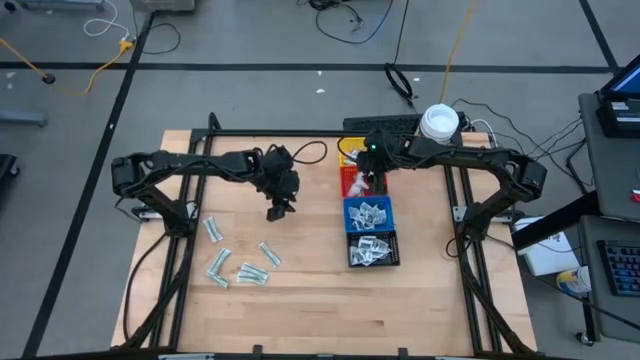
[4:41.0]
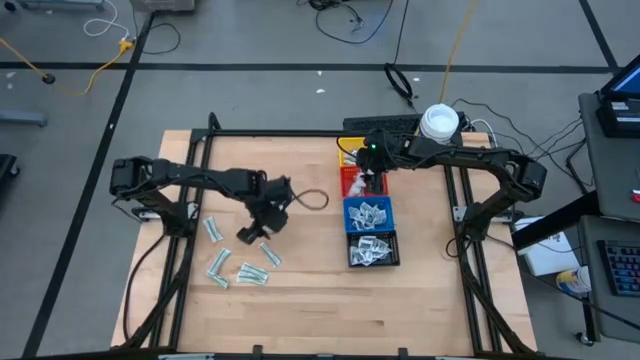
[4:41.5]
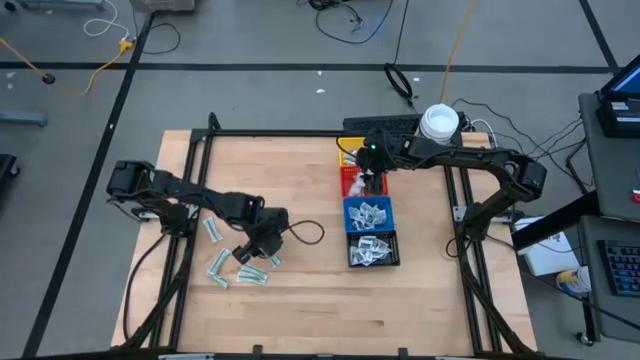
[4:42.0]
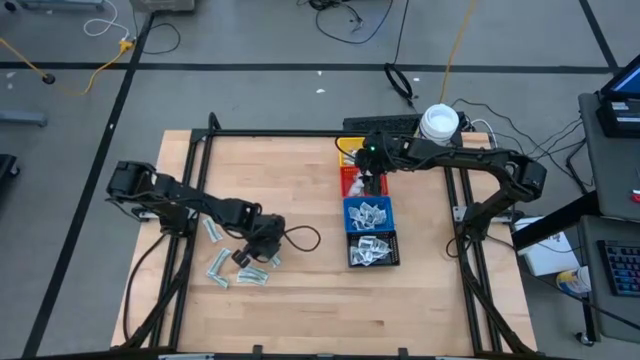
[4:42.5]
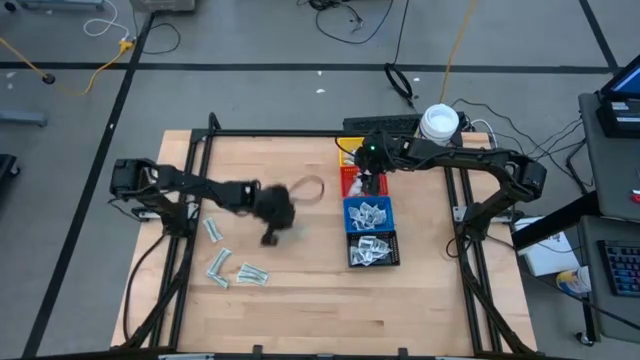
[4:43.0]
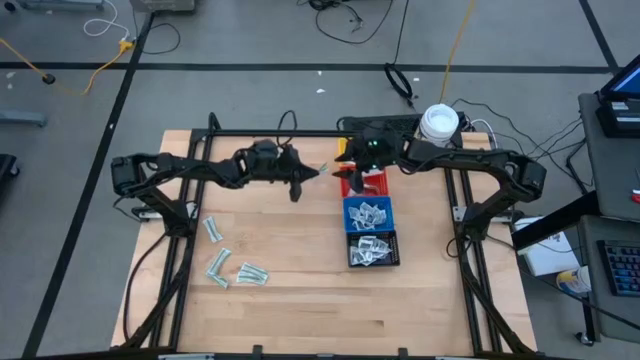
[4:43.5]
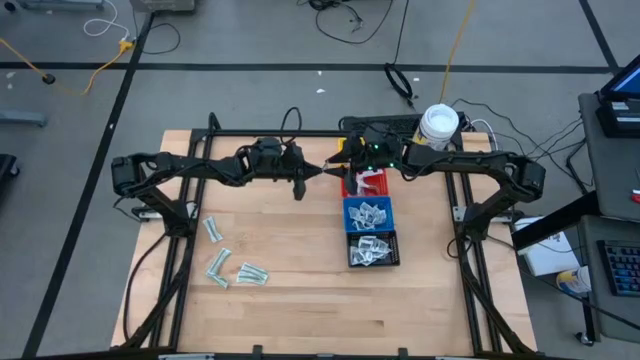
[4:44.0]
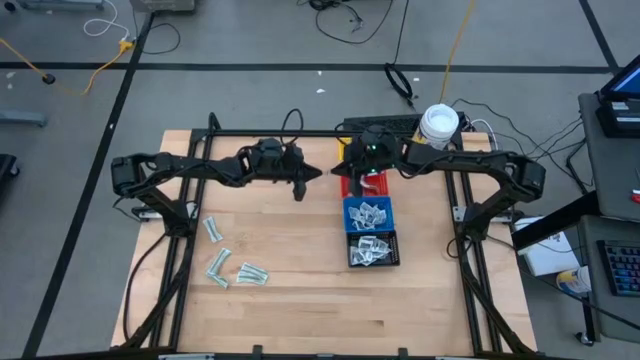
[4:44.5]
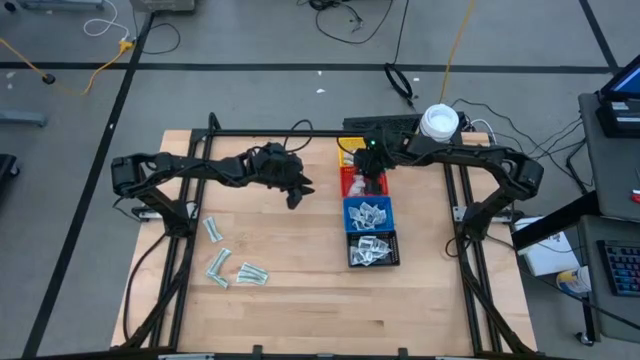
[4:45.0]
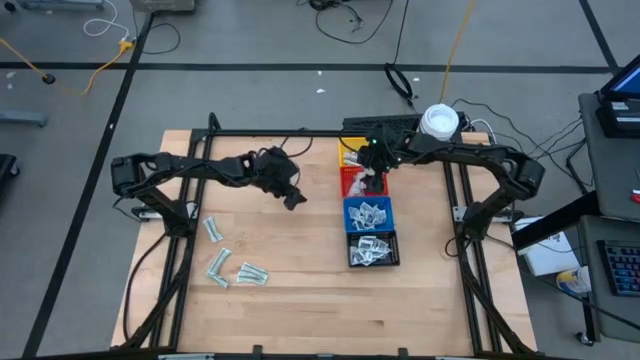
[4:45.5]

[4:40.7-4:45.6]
Task: Pick & Place First Aid Supplies
Put the green bandage pack into the red bin

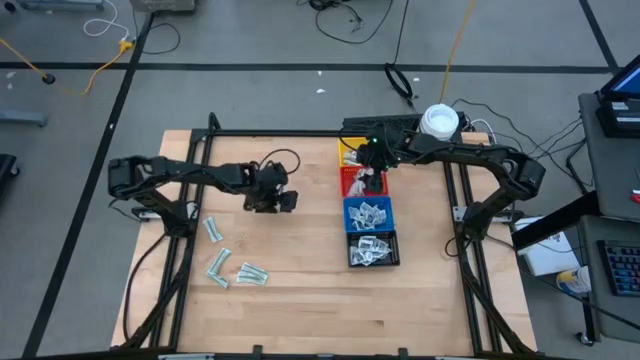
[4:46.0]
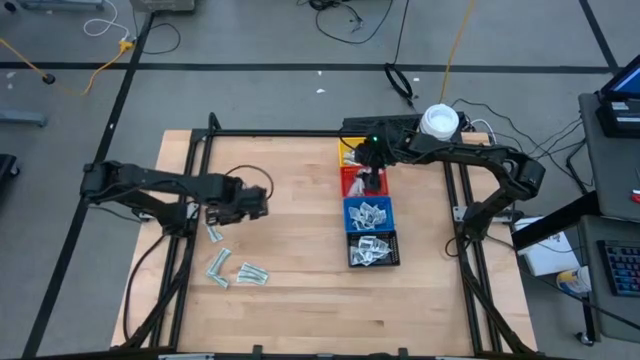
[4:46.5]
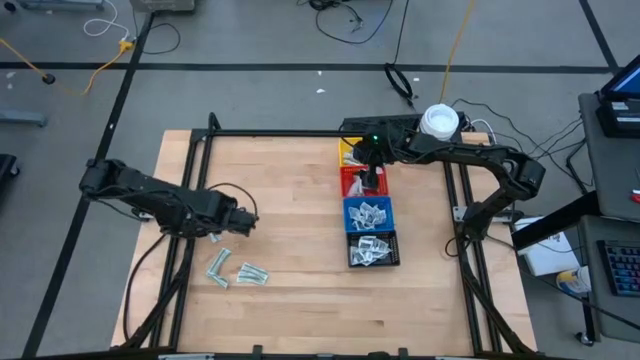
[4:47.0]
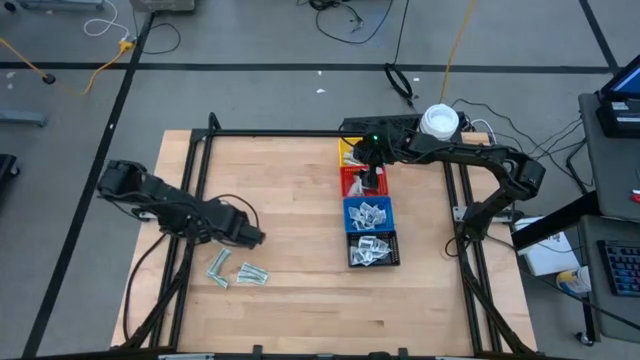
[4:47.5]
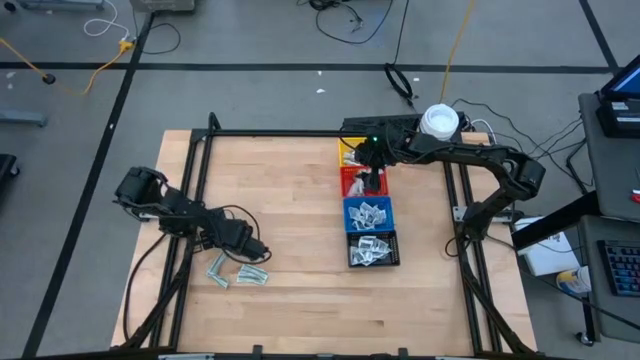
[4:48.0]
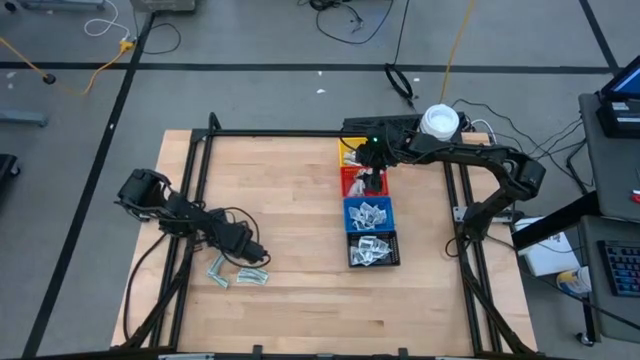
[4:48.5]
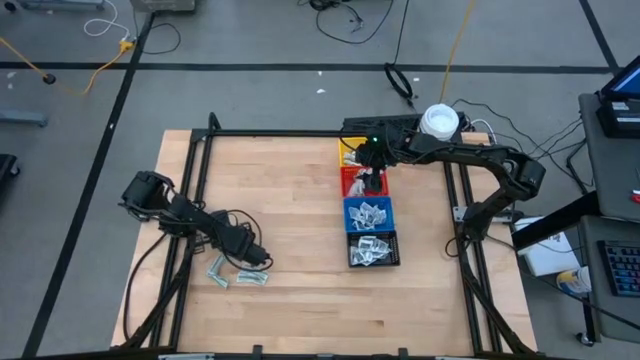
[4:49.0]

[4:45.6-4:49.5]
Put the green bandage pack into the red bin

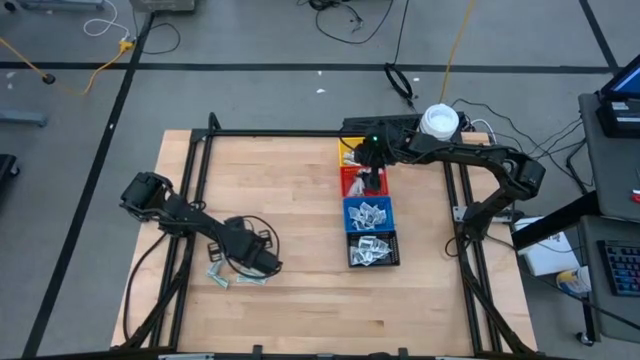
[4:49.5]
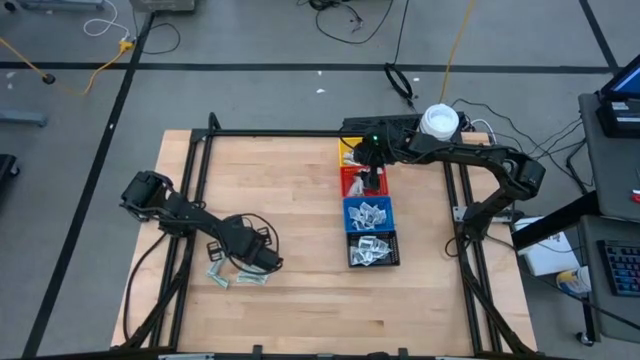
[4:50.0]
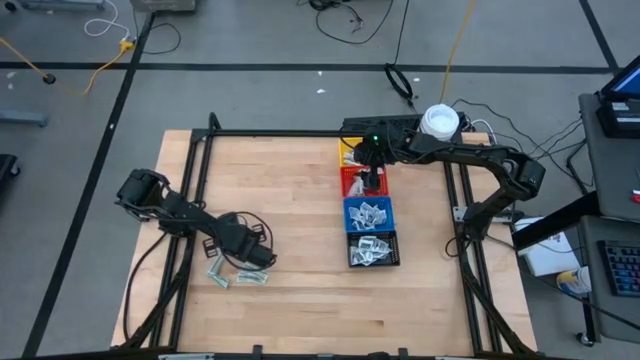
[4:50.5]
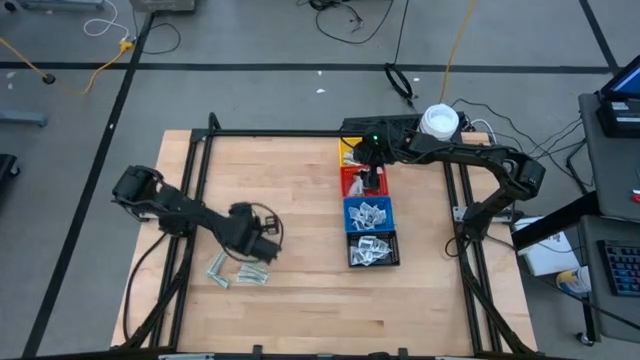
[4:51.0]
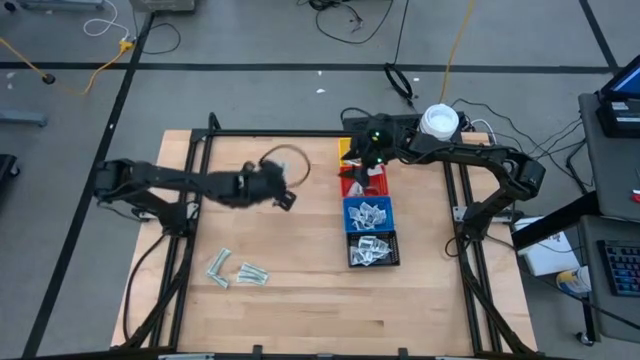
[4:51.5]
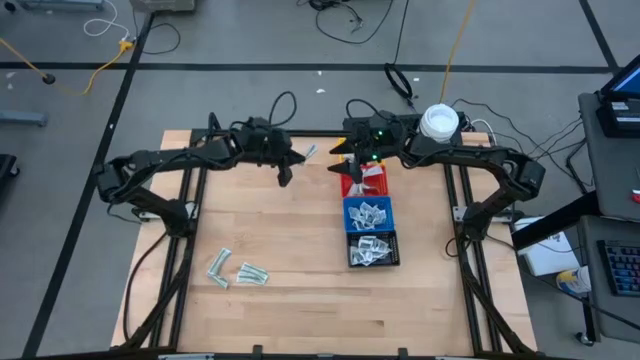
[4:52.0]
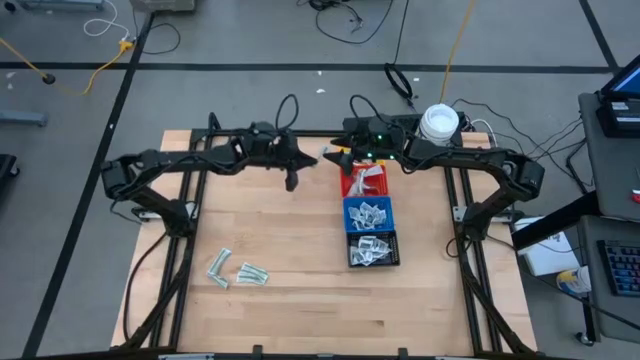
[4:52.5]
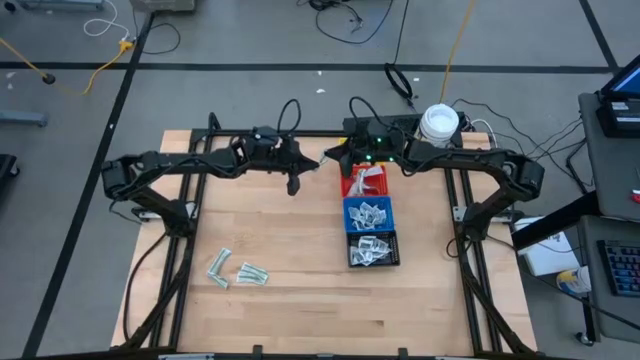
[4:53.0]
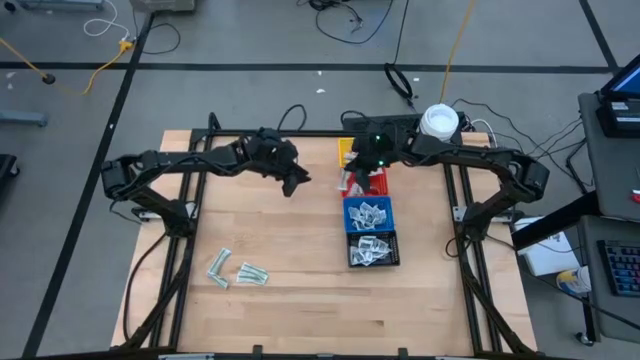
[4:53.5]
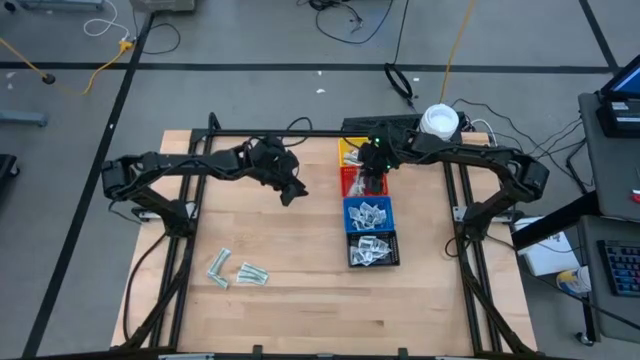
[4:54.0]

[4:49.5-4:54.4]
Put the green bandage pack into the red bin

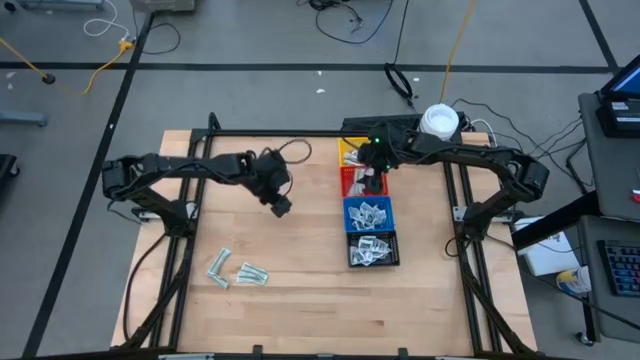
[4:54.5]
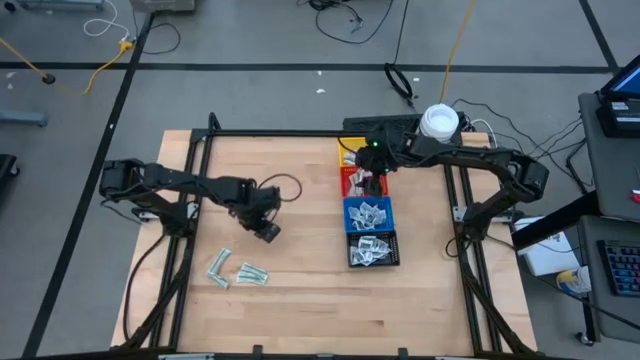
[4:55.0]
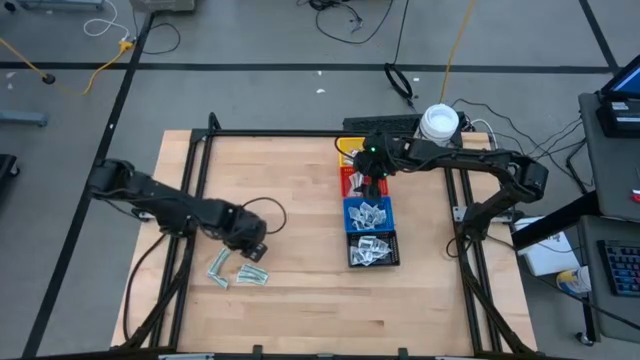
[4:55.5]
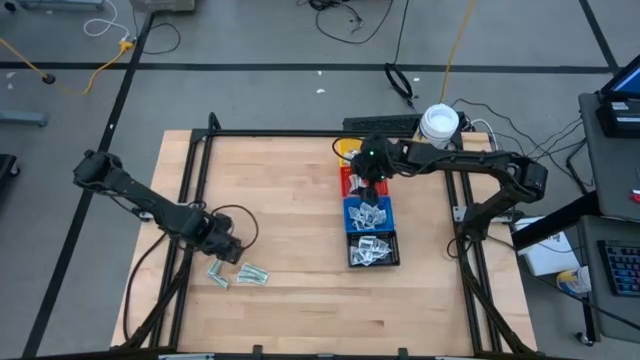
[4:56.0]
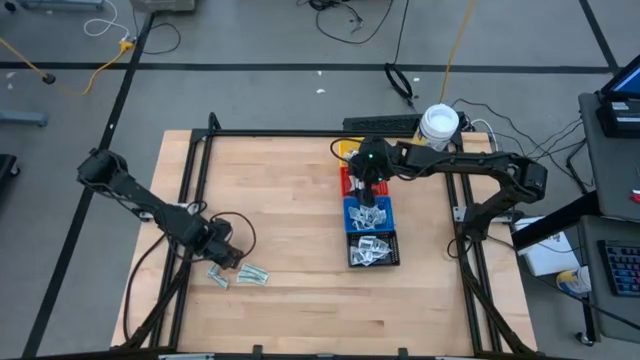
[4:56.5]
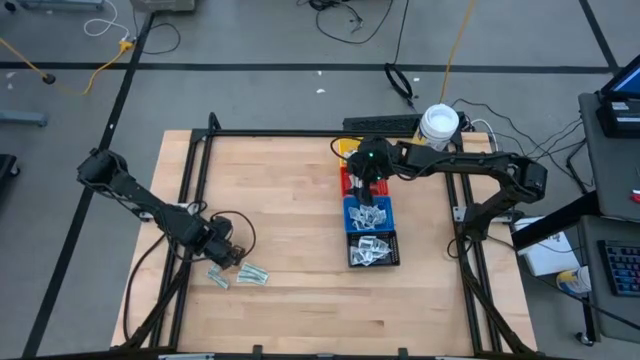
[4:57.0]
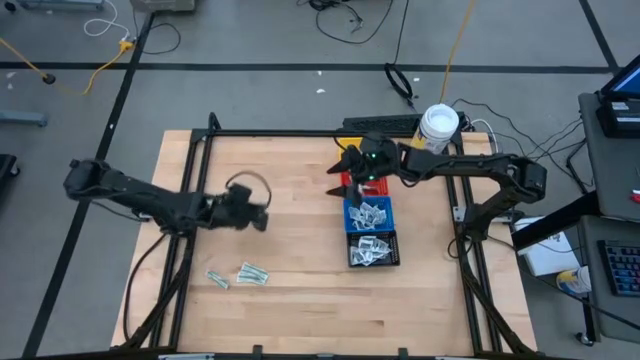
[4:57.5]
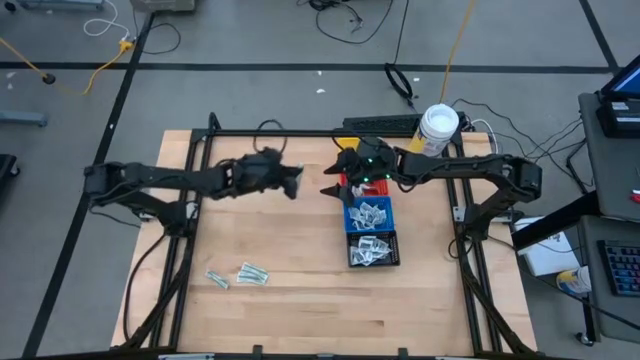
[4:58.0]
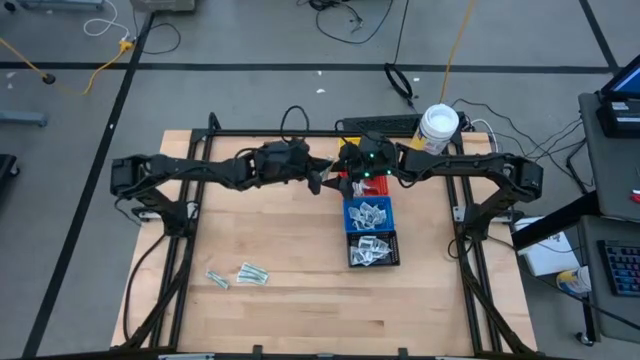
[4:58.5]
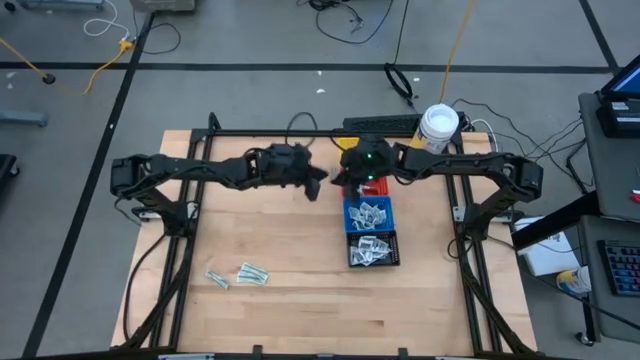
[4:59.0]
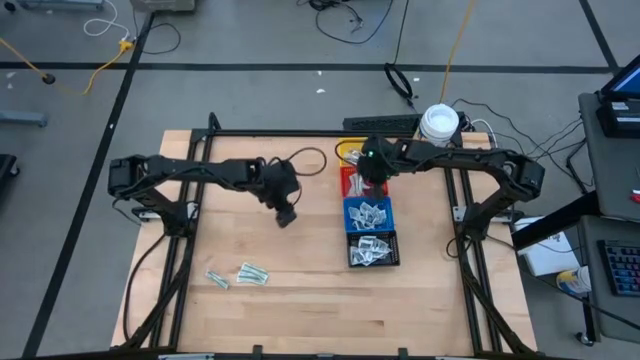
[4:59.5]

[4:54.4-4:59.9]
Put the green bandage pack into the red bin

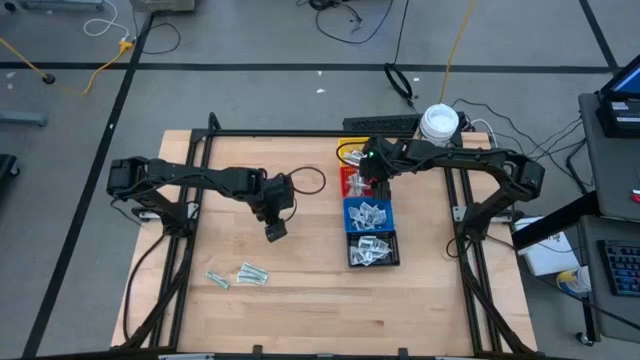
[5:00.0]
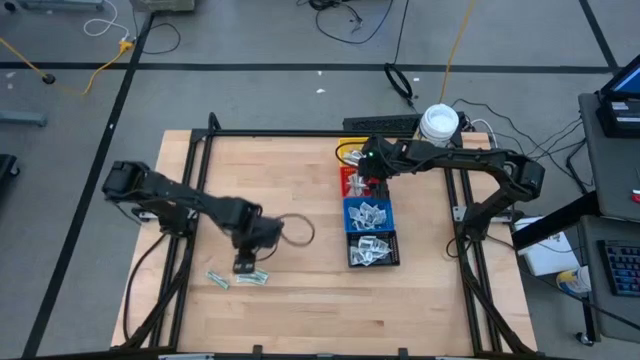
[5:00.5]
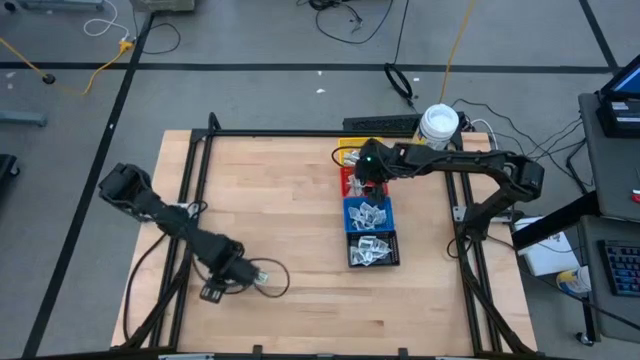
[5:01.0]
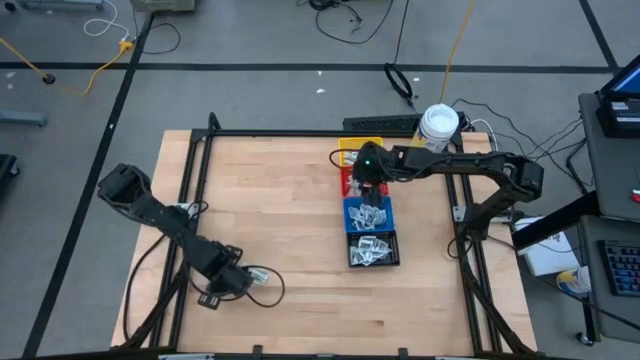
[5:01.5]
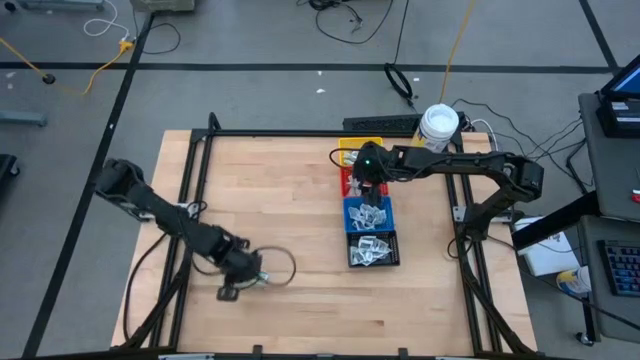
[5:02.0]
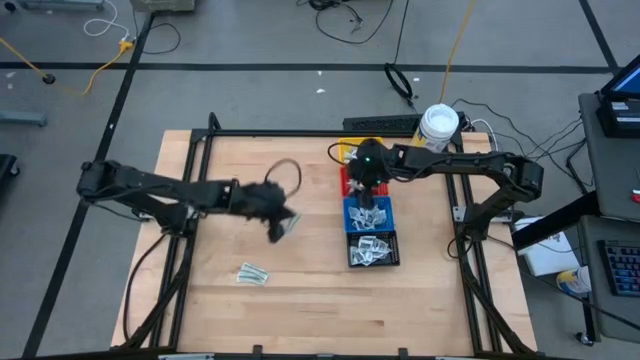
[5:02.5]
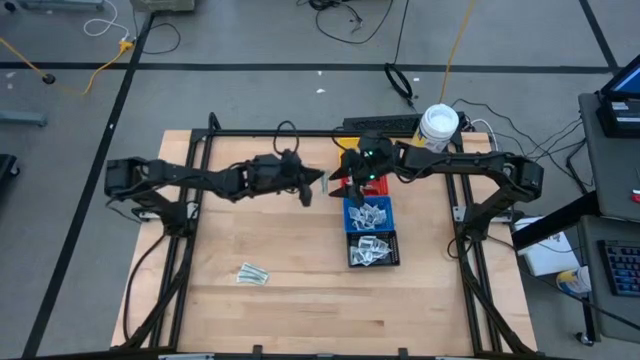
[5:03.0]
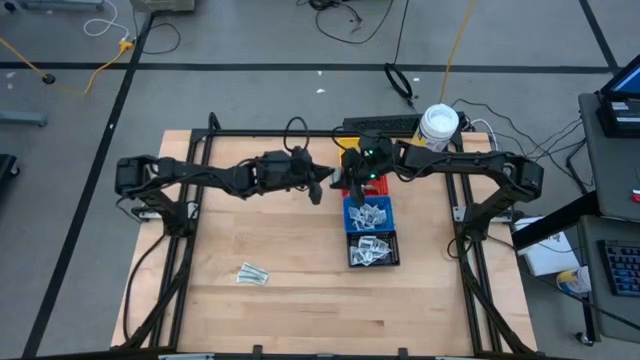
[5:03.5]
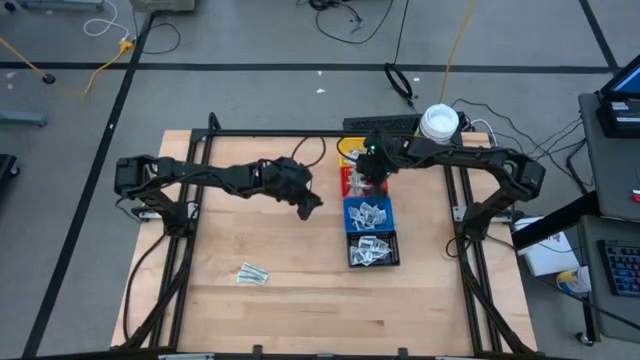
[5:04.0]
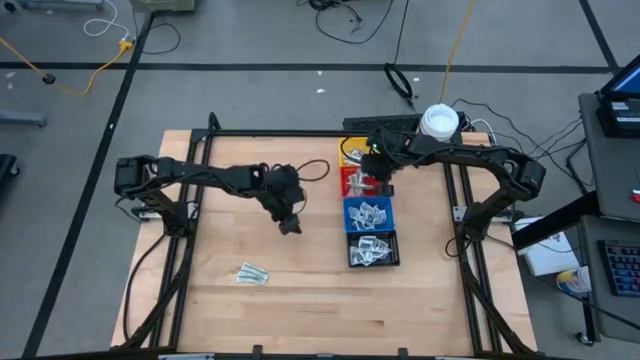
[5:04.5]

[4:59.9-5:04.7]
Put the green bandage pack into the red bin
